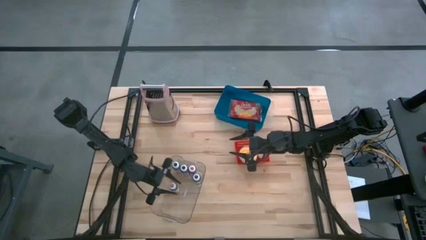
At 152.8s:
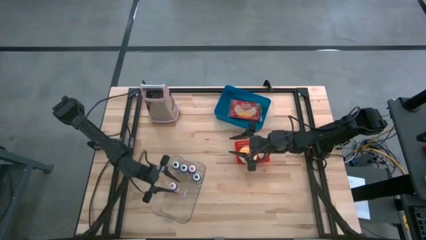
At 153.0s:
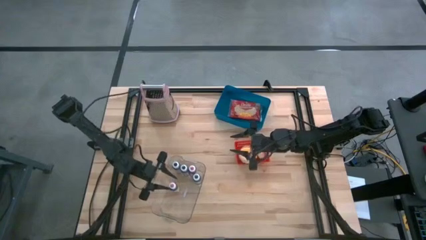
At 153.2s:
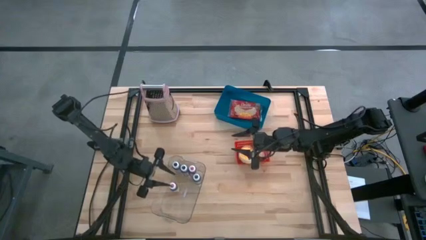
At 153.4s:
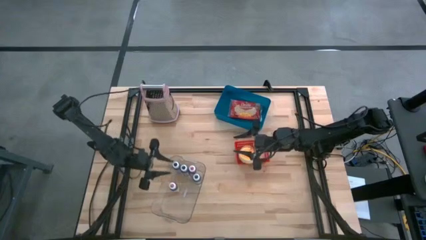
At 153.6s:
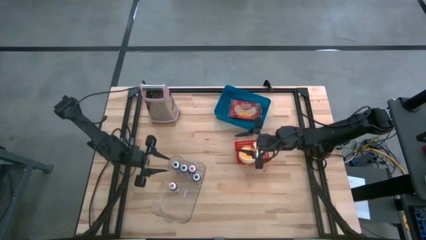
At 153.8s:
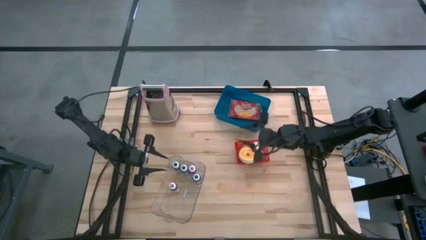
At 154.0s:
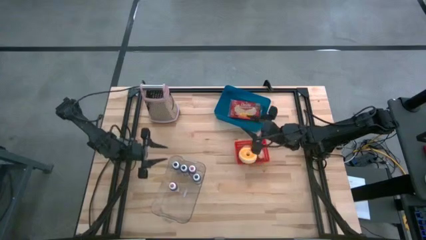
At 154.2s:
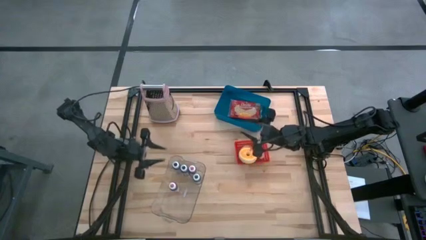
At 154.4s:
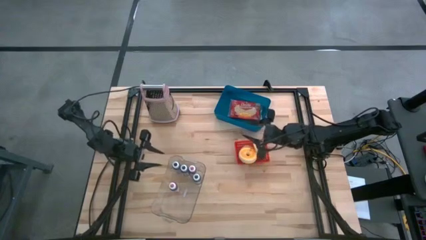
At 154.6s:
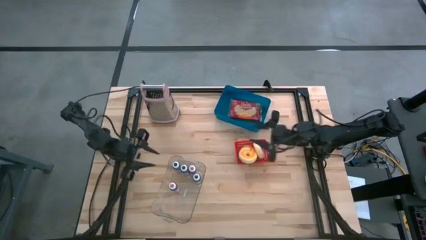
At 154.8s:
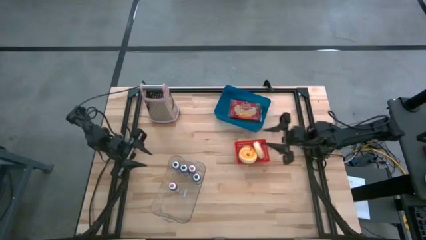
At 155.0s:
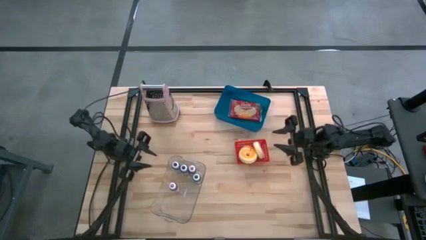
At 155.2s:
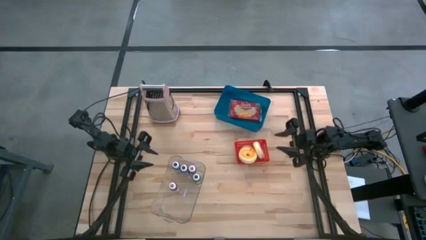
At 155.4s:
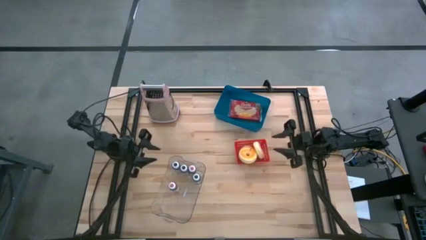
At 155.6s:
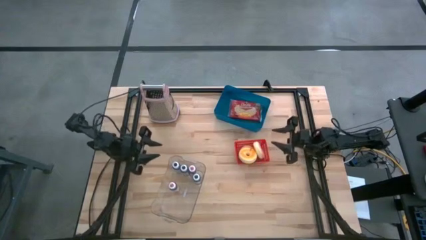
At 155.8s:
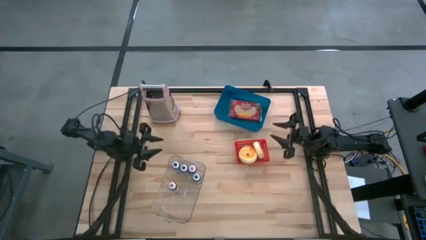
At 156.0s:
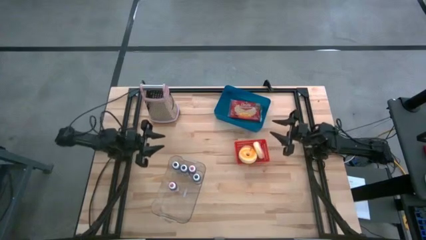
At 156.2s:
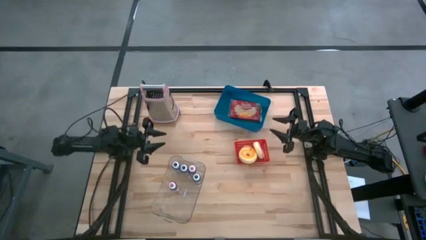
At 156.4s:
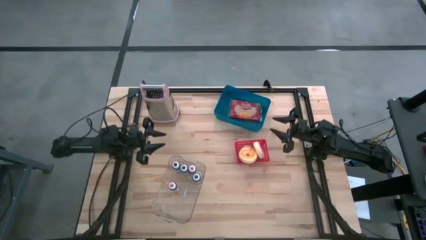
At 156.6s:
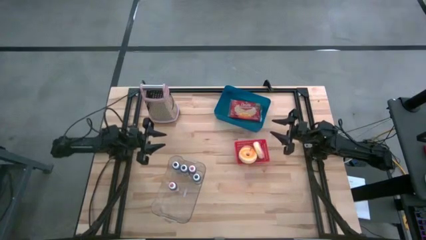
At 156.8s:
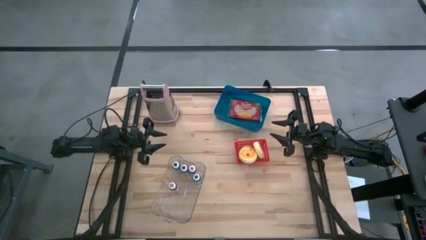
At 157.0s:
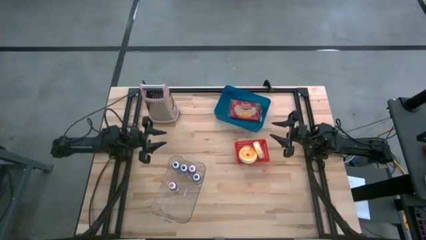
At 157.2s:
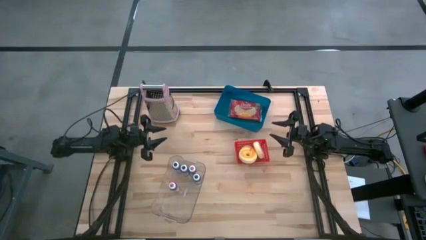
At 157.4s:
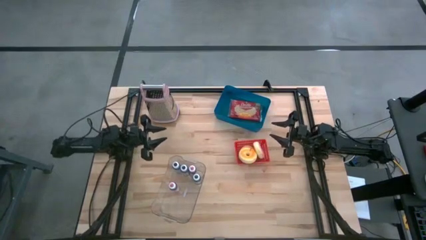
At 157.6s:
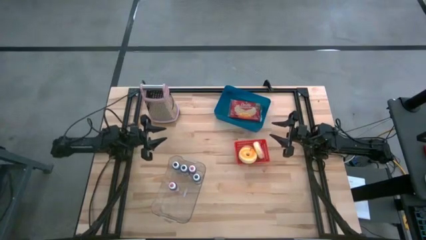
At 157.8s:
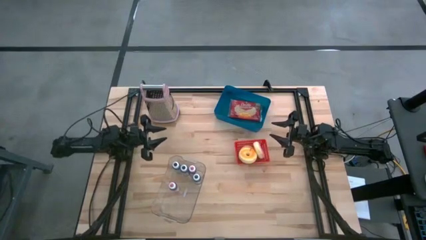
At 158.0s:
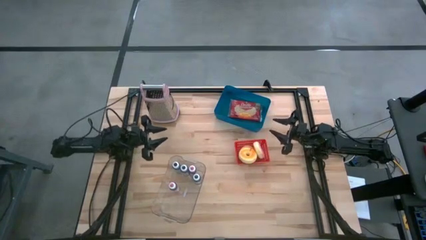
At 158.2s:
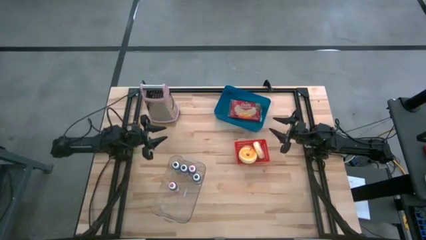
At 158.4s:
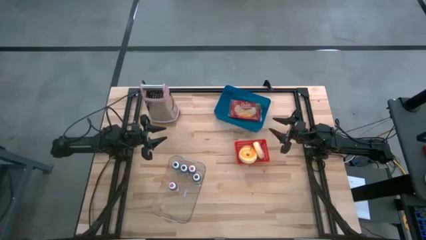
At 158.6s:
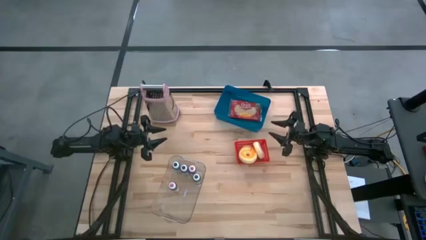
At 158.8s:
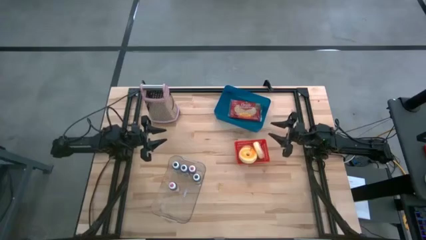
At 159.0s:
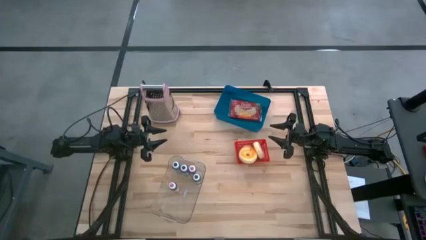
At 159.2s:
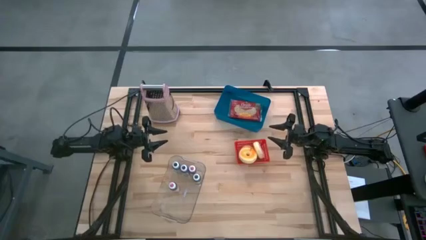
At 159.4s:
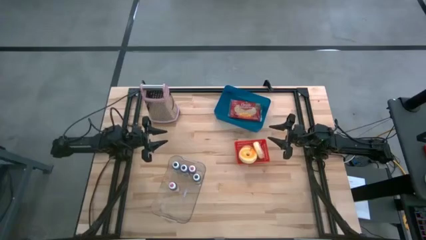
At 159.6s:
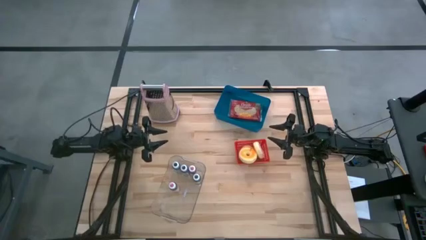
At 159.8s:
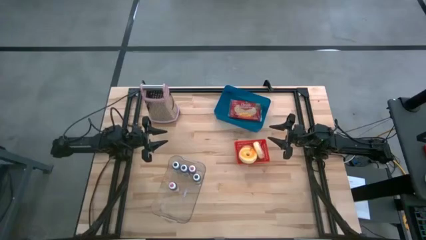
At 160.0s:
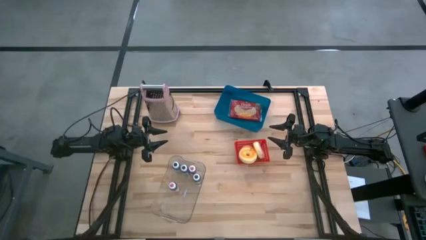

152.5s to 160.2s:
Task: Pick & Place Food Item
Return to Home Position

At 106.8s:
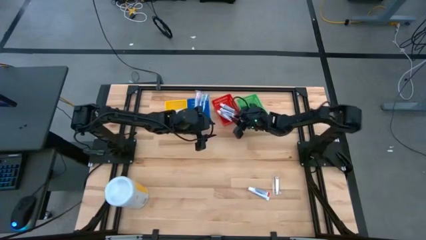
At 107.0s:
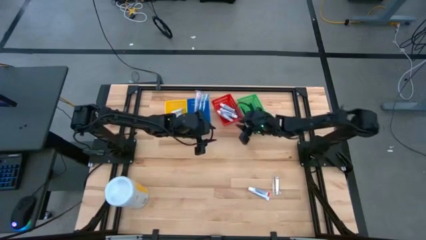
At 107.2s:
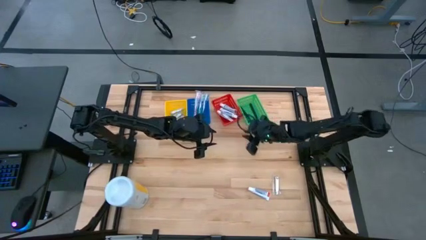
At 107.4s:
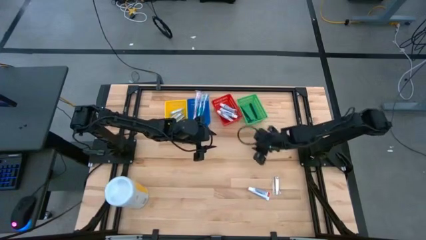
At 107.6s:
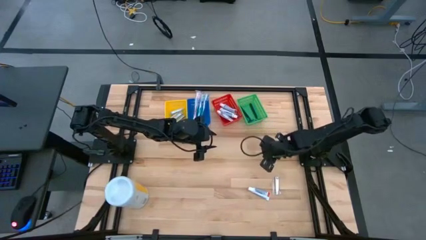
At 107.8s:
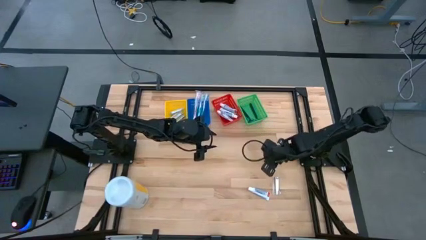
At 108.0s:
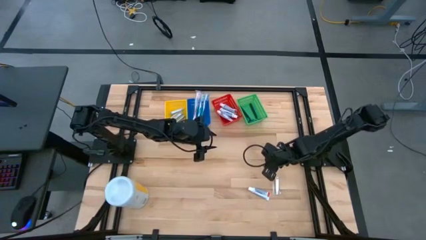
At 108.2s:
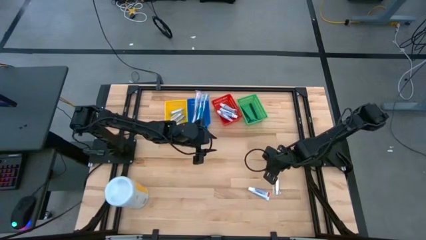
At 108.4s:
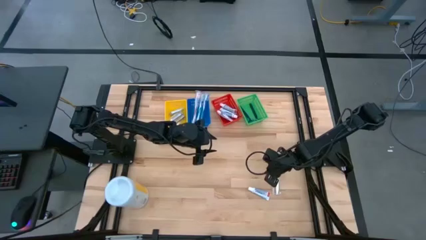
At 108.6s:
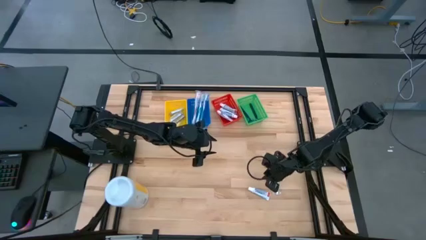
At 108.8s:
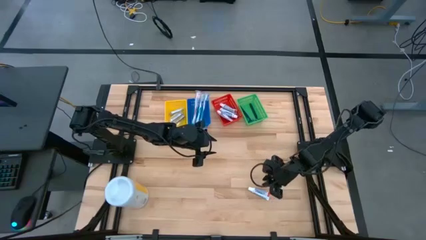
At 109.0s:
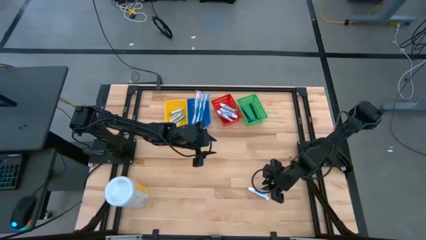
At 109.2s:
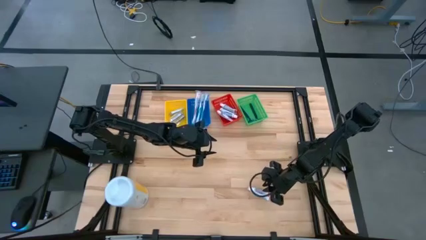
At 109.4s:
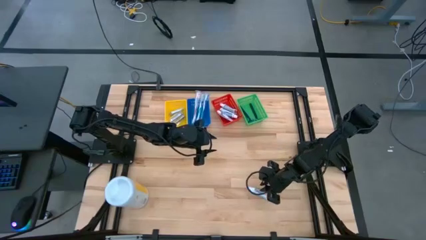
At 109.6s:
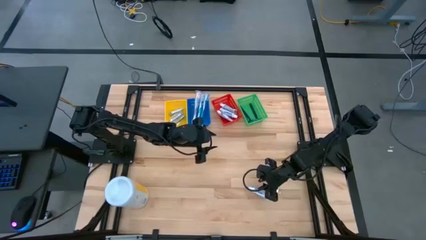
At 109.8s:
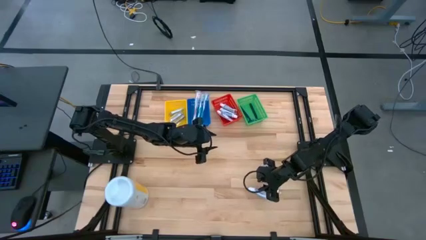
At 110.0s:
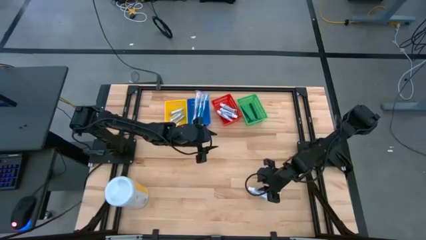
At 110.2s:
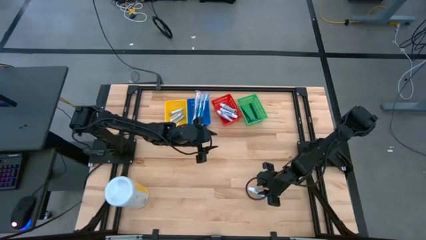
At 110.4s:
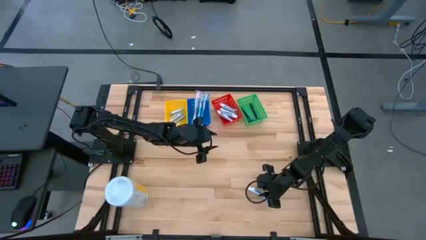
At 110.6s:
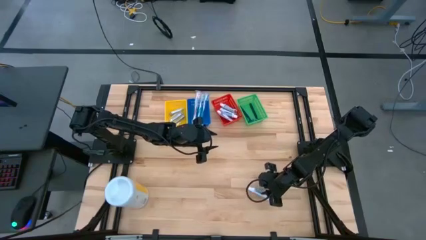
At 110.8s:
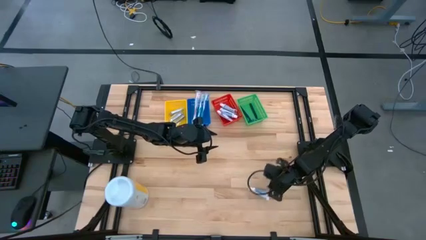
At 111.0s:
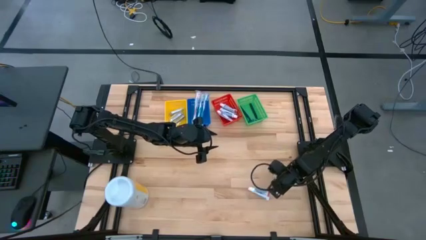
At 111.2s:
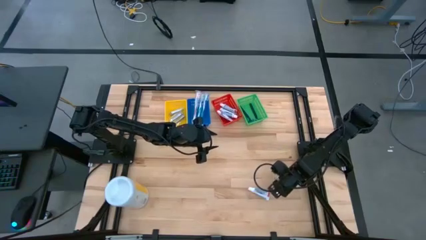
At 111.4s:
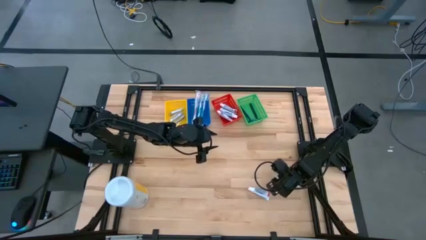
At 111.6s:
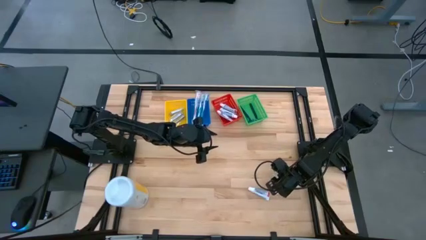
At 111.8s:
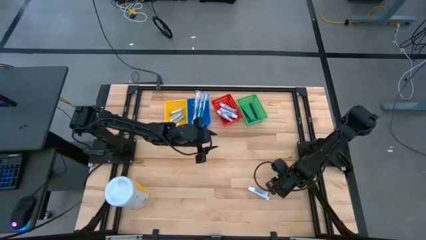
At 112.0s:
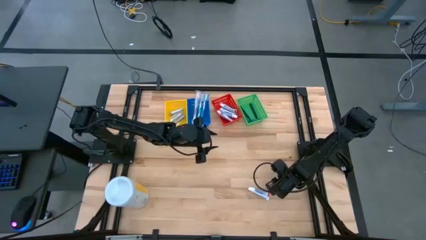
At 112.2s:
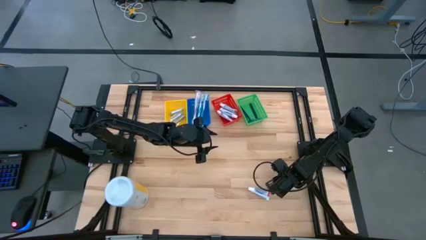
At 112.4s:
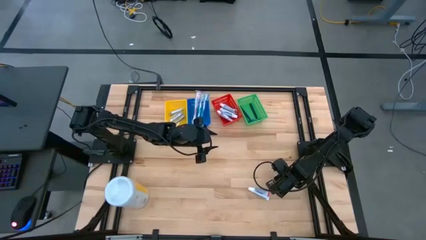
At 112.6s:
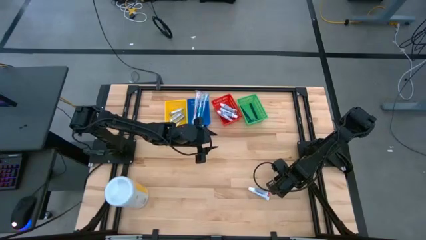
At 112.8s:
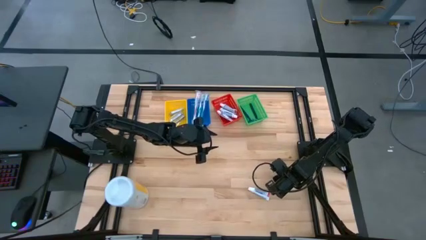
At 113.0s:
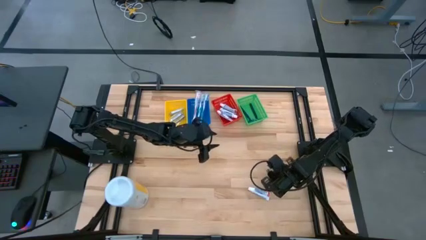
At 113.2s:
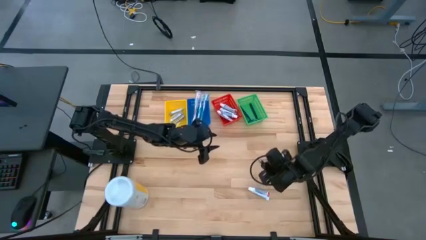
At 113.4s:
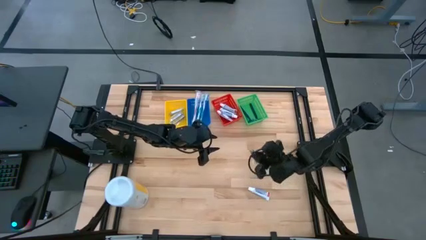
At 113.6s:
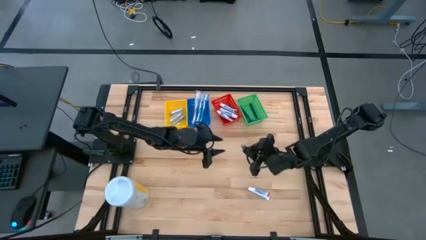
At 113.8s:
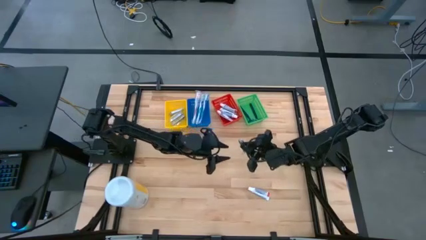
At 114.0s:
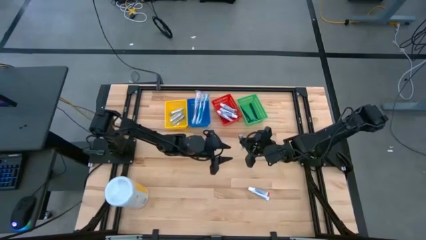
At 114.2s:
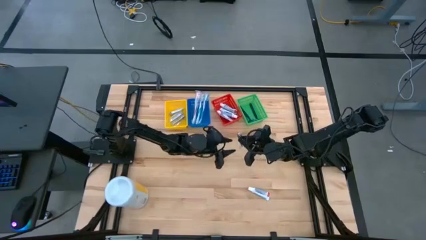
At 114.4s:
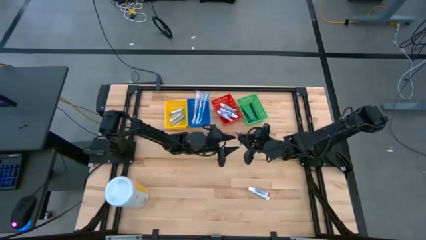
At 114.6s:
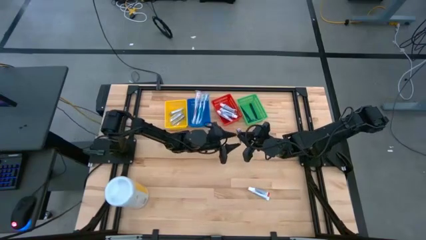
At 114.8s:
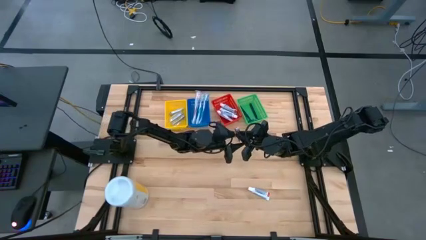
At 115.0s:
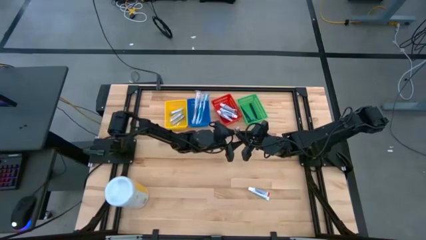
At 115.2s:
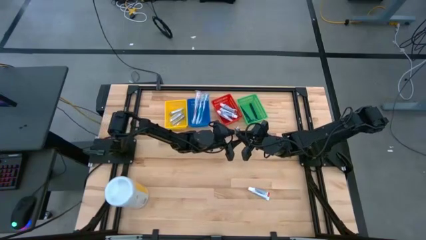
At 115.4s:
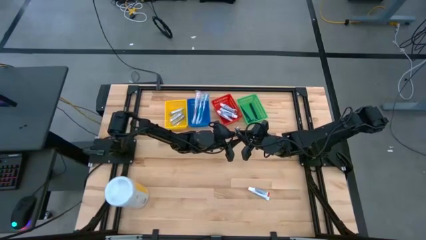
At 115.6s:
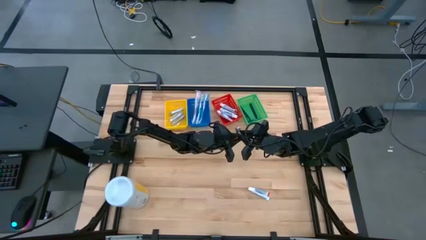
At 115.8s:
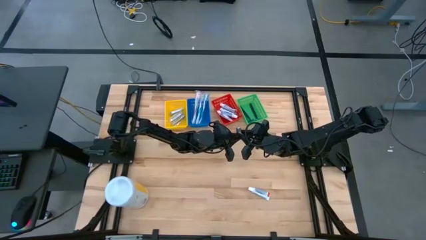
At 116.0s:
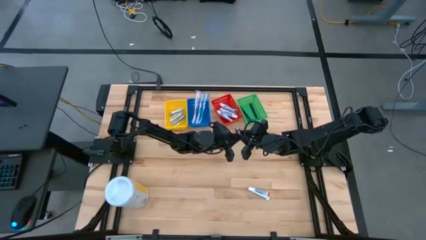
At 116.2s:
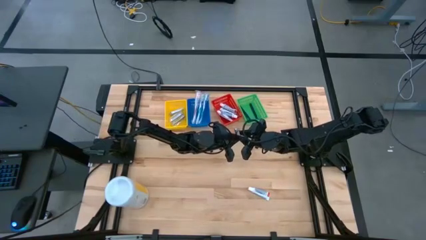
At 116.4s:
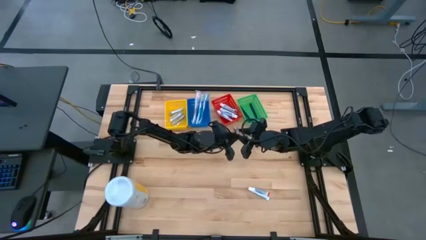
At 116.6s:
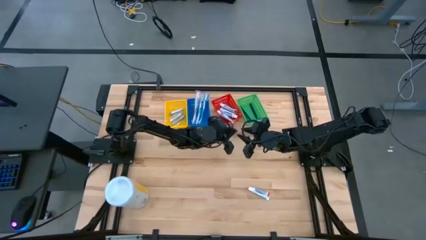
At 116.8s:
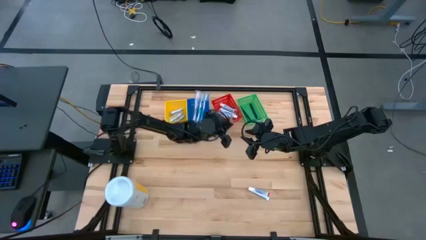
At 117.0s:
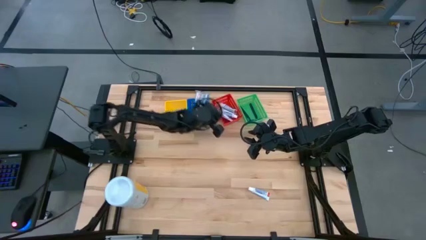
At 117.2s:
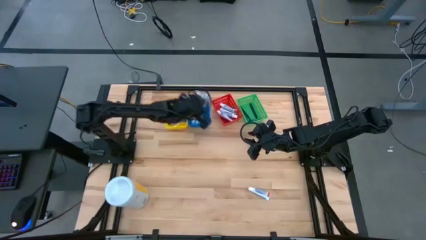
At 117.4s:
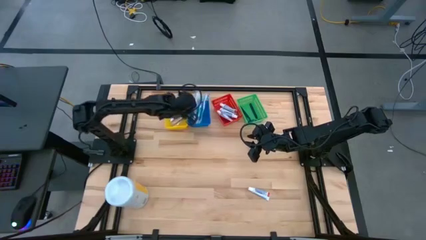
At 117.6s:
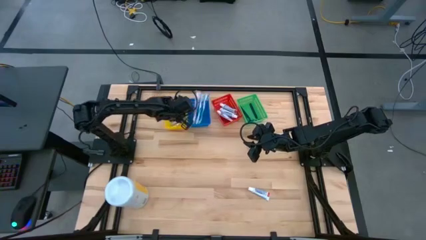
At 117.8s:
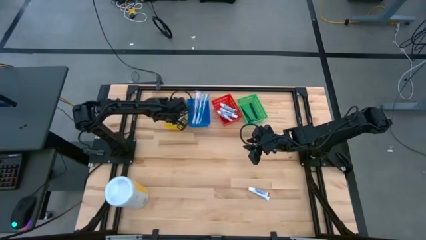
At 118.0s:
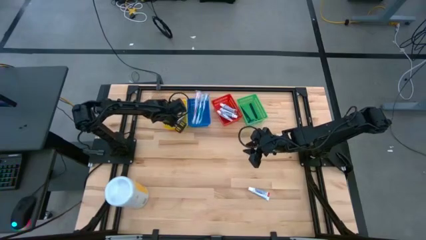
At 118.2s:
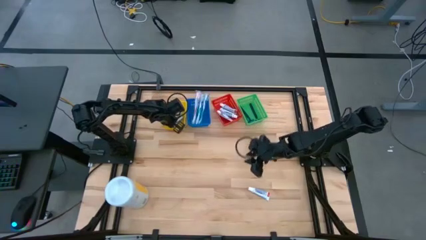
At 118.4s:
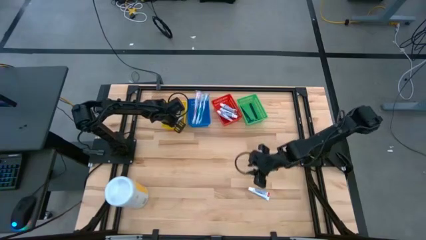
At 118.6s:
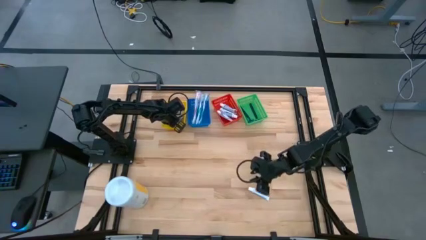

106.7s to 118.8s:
Task: Pick & Place Travel size toiletries
Put the nail cutter into the yellow bin
